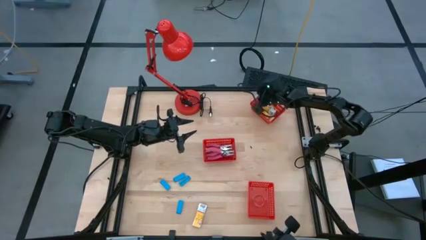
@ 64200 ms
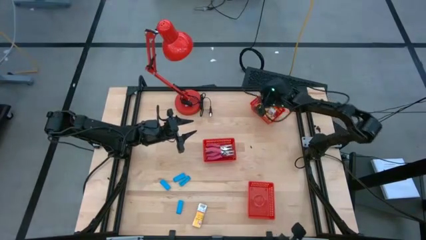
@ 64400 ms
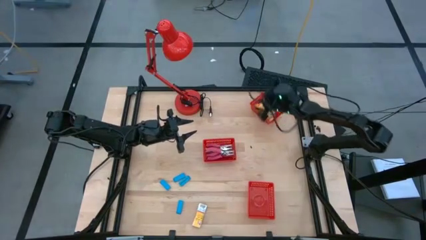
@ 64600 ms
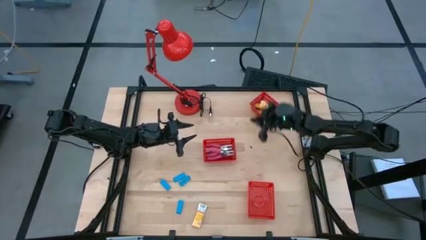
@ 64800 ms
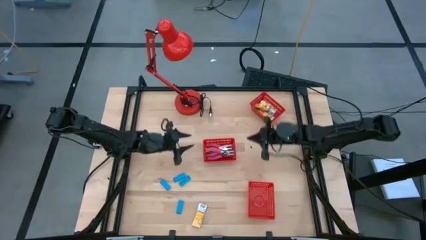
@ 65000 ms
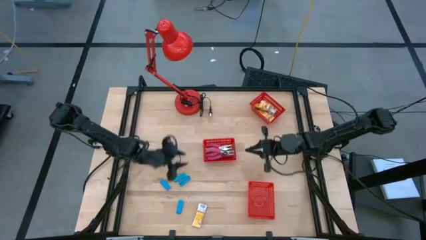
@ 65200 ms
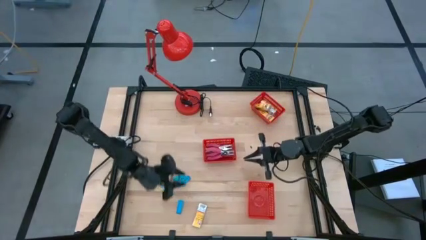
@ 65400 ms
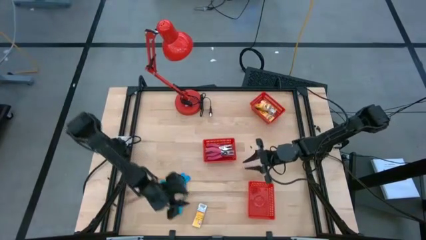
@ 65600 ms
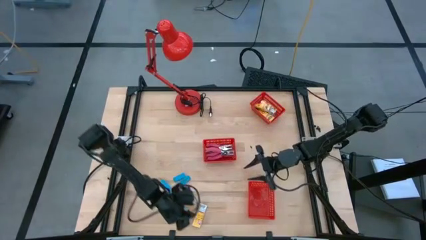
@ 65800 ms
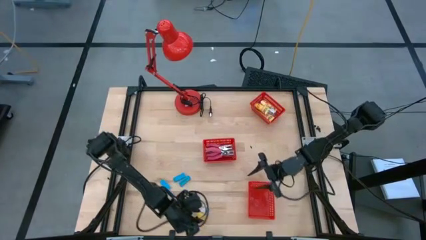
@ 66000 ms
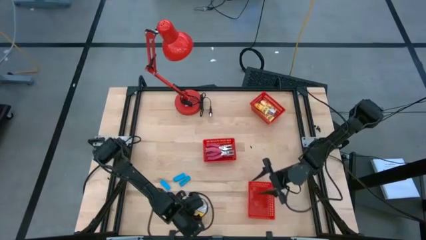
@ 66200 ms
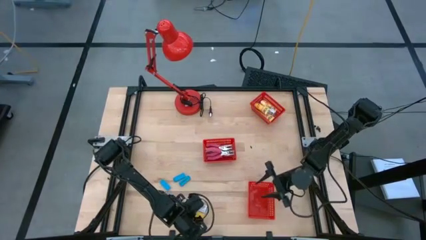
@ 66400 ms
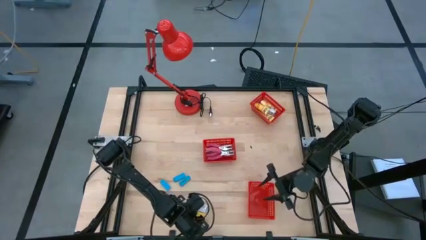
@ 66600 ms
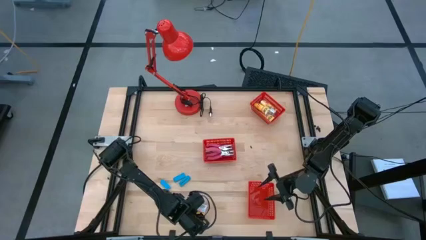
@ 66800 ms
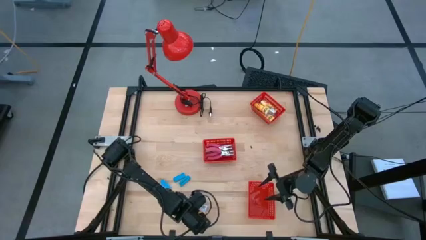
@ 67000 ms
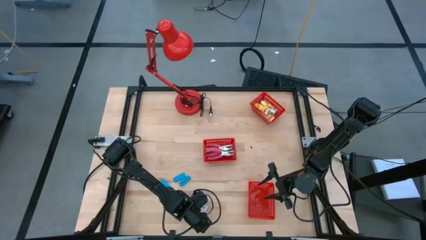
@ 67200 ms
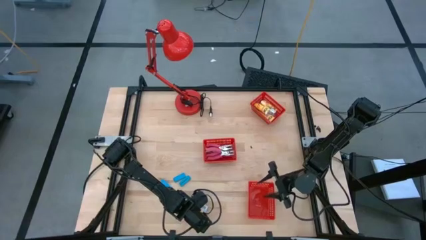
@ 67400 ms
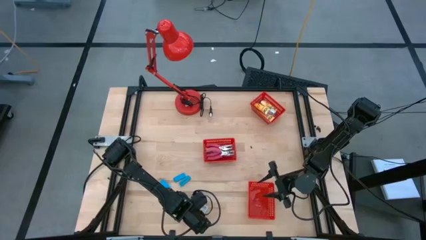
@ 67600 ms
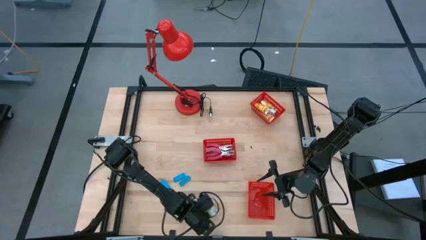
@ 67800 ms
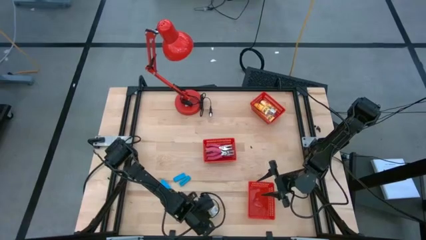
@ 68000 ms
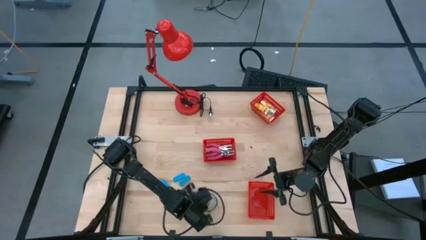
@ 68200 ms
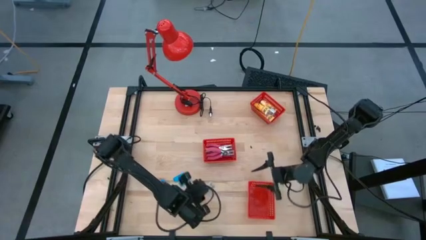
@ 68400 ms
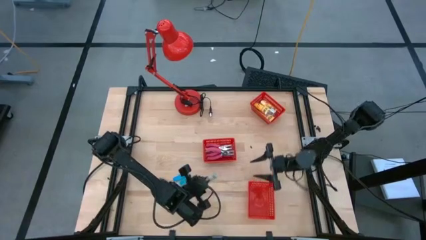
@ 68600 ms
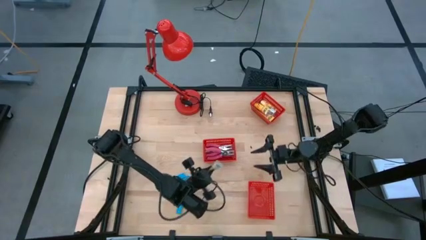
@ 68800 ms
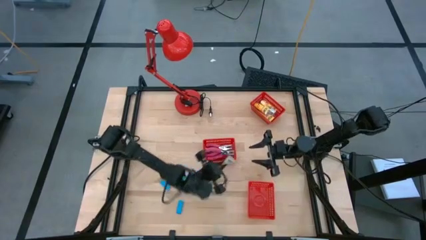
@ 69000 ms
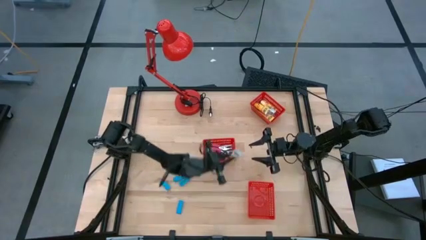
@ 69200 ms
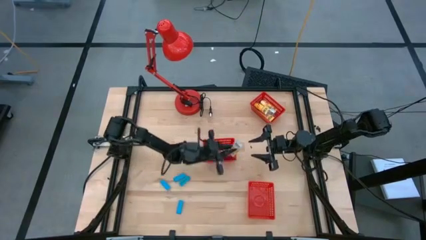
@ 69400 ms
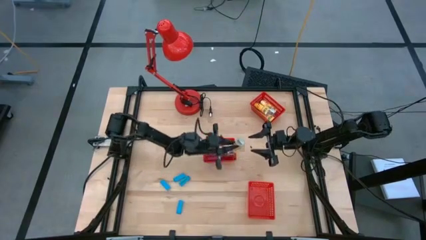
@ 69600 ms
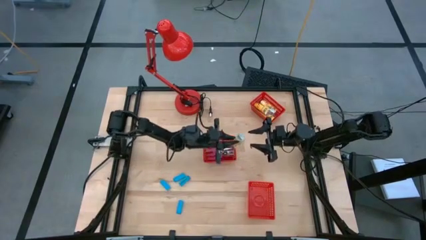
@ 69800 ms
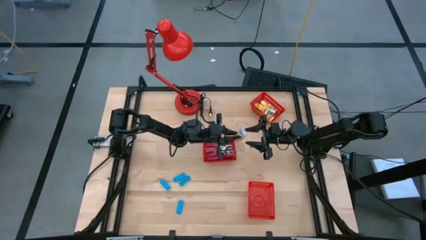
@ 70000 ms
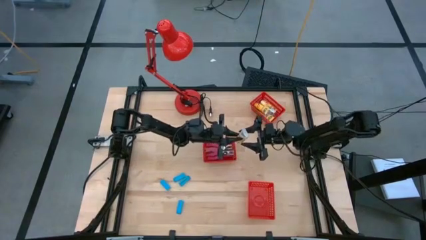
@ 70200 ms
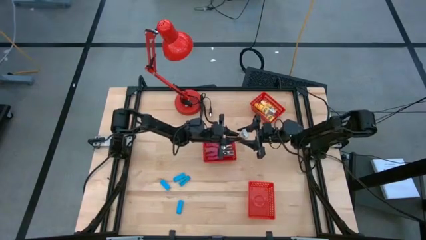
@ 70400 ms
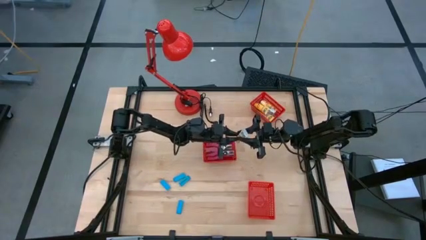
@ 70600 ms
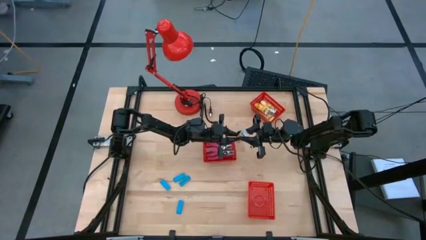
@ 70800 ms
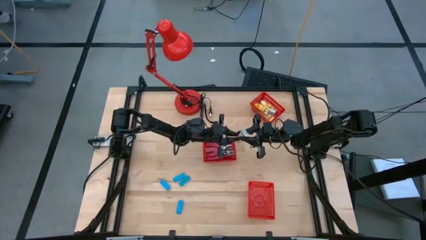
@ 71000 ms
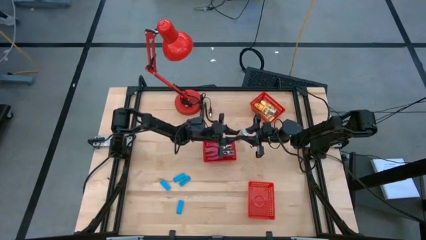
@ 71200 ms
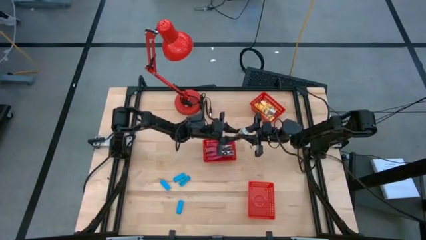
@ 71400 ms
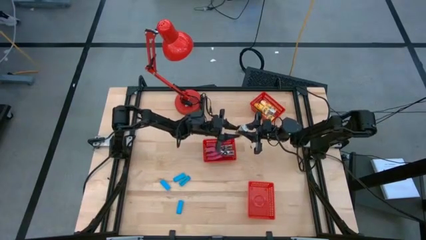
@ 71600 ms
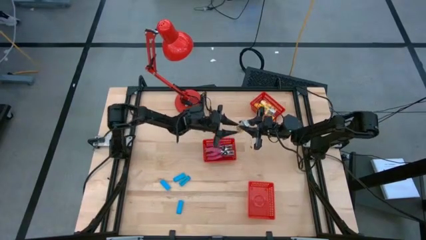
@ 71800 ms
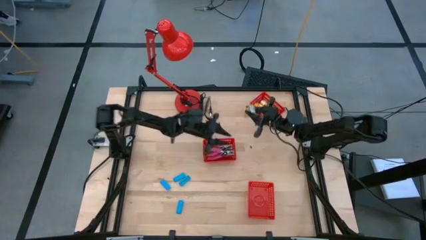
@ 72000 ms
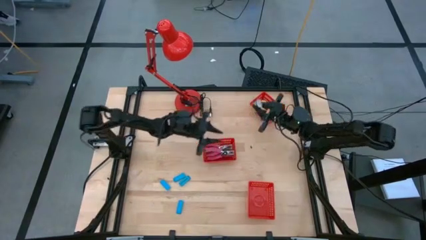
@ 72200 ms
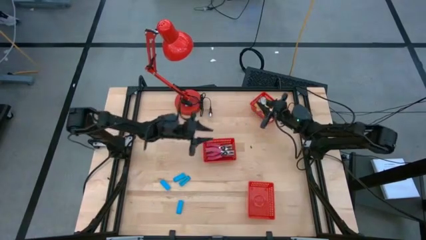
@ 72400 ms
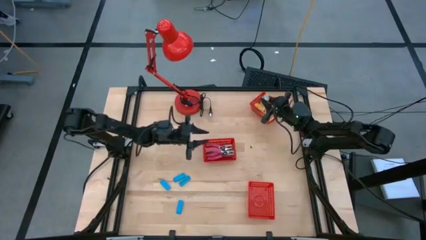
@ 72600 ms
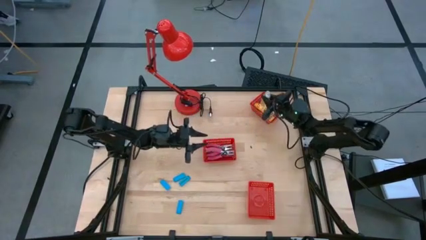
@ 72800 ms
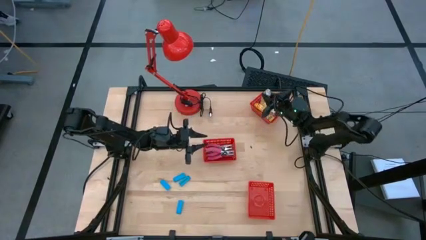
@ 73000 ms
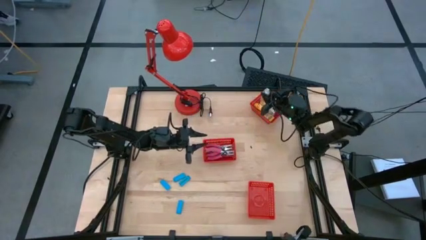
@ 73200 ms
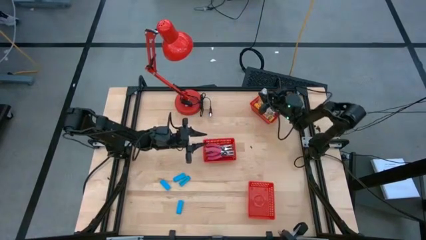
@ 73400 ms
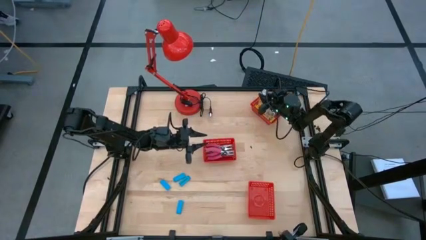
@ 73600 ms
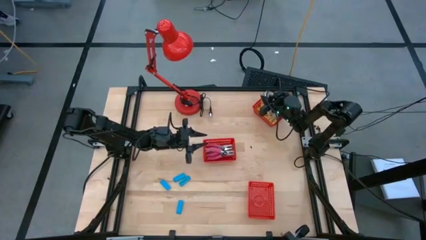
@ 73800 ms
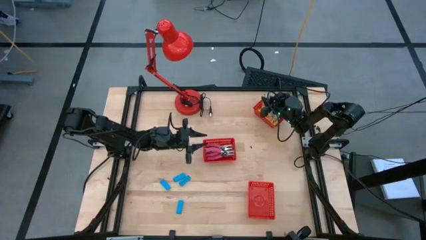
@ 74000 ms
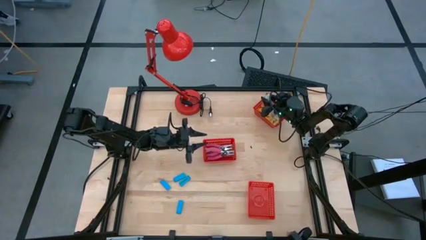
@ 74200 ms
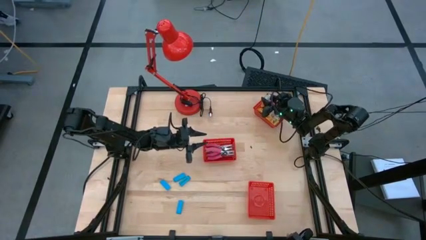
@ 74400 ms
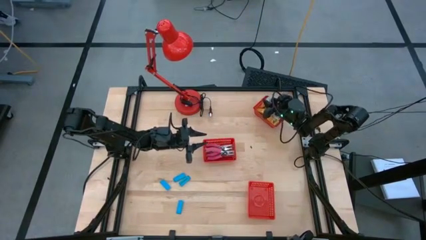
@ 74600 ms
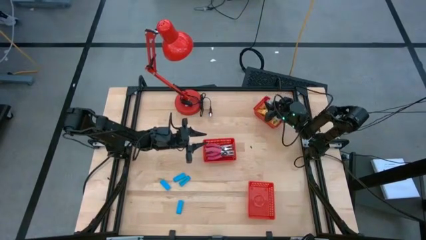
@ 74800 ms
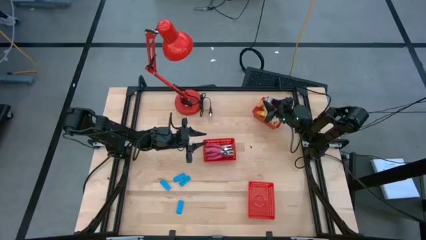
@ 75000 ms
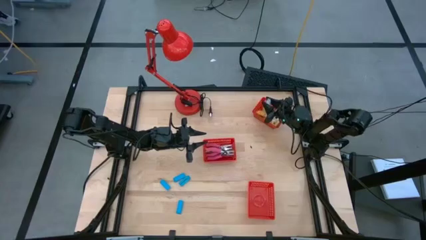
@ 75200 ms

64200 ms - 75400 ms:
Task: Pick & Place School Supplies
Put the yellow crayon box into the top red bin
